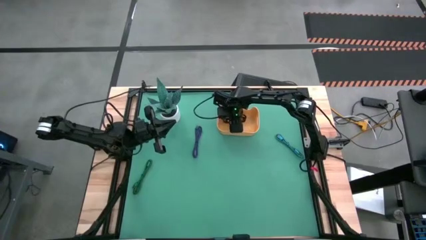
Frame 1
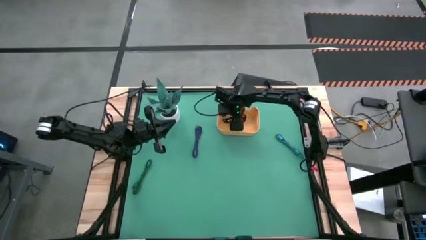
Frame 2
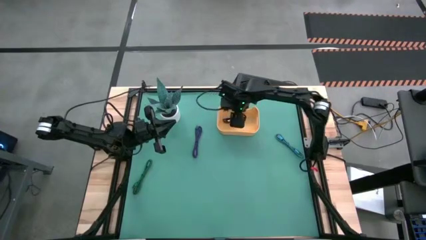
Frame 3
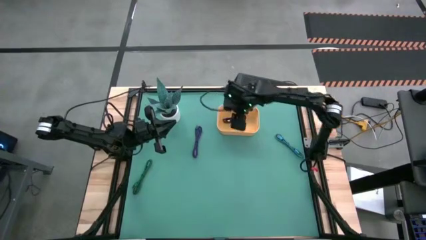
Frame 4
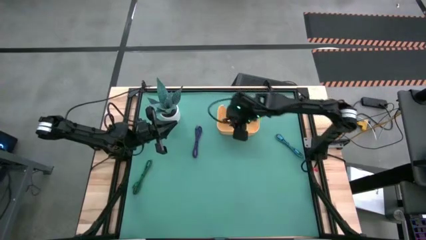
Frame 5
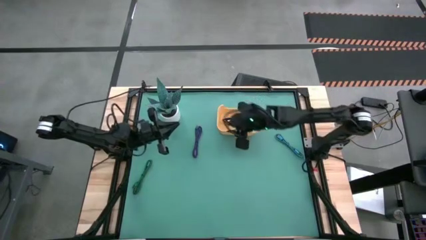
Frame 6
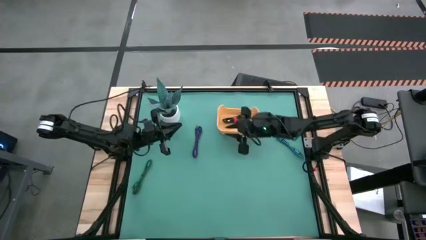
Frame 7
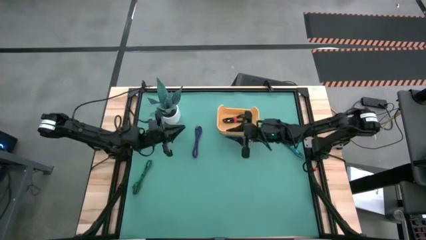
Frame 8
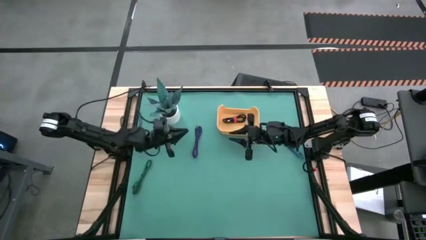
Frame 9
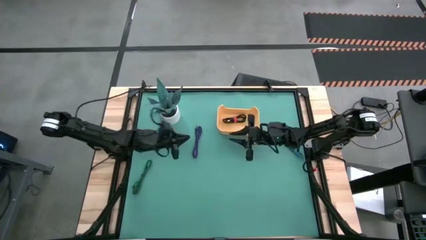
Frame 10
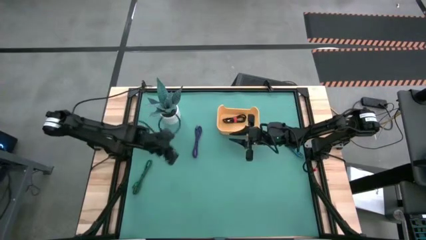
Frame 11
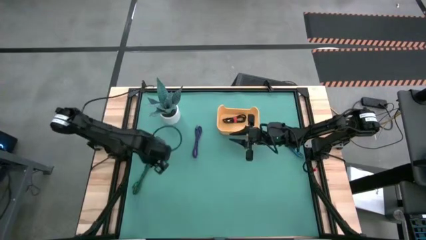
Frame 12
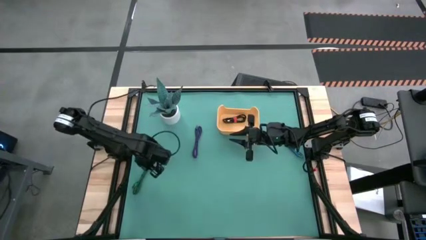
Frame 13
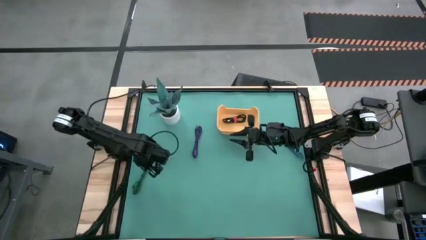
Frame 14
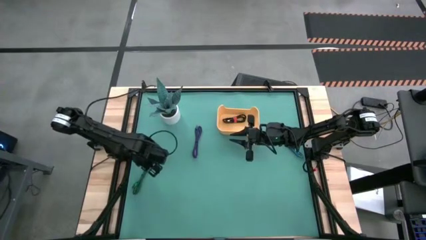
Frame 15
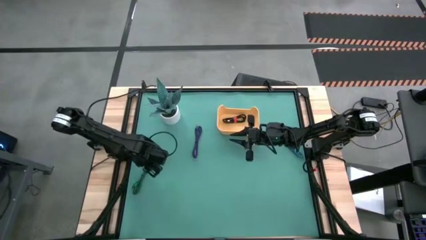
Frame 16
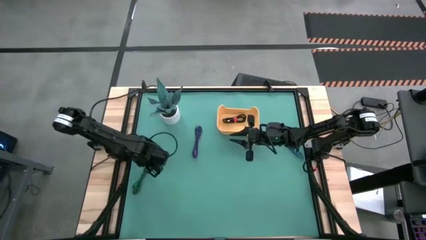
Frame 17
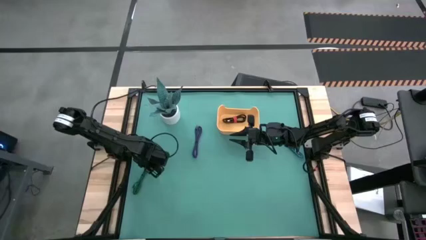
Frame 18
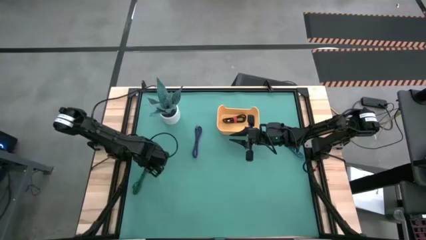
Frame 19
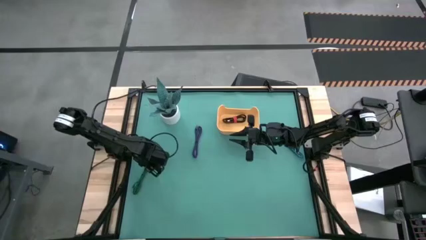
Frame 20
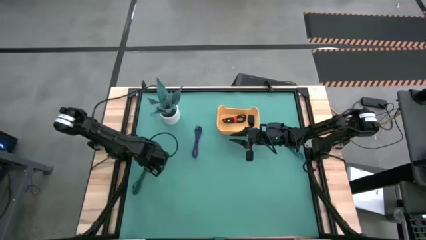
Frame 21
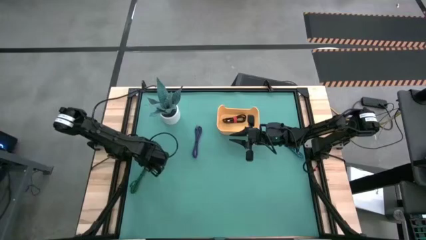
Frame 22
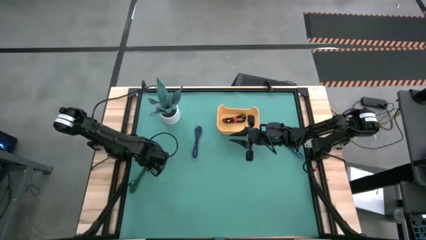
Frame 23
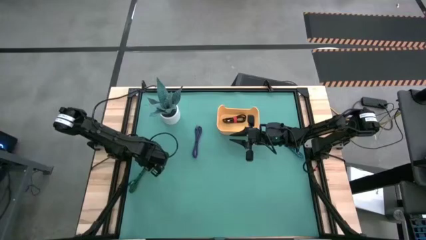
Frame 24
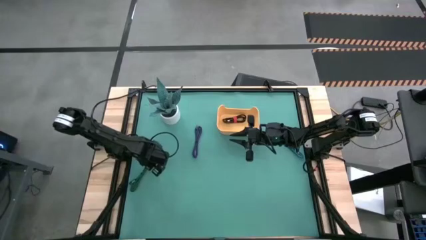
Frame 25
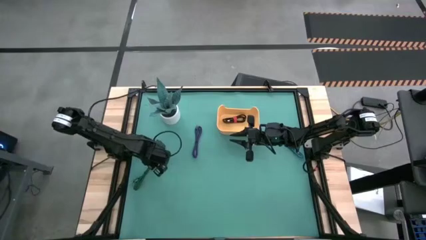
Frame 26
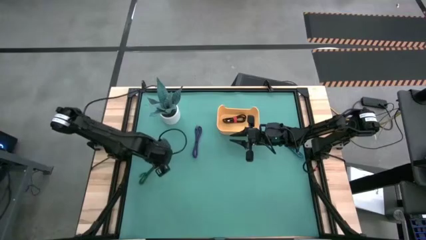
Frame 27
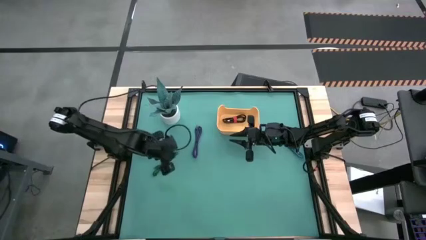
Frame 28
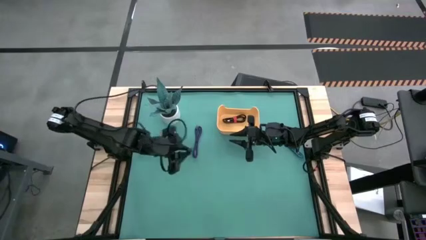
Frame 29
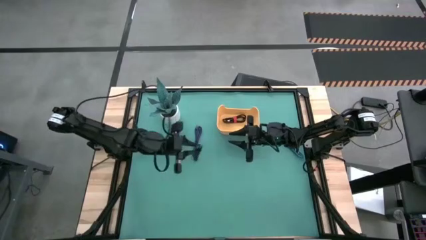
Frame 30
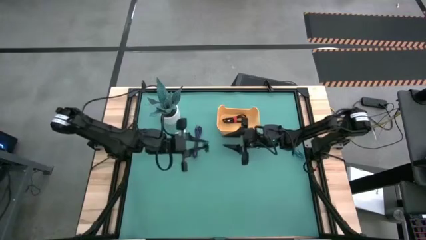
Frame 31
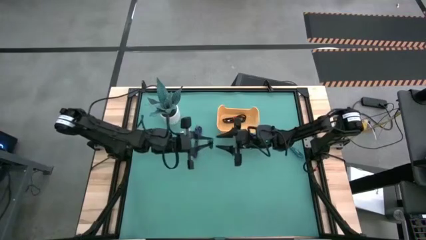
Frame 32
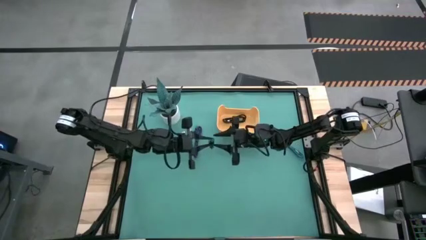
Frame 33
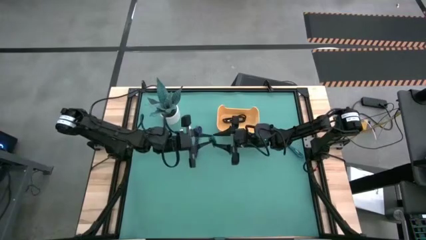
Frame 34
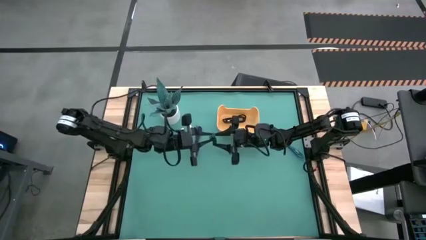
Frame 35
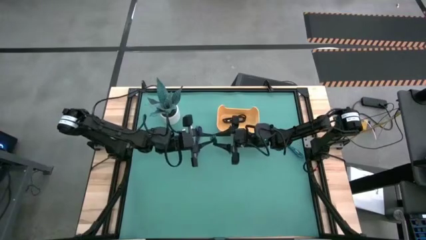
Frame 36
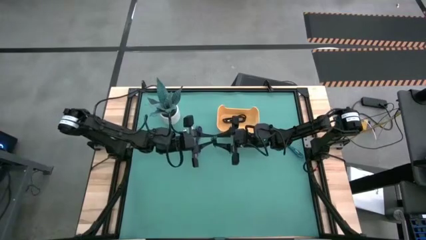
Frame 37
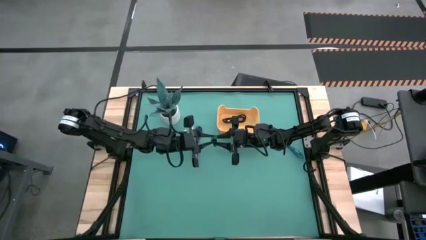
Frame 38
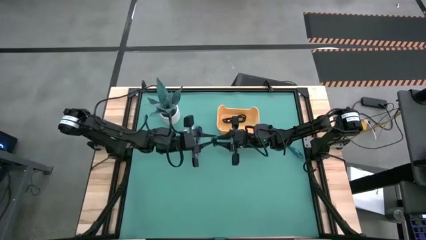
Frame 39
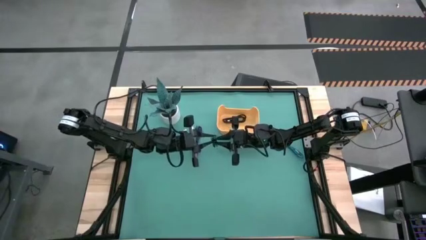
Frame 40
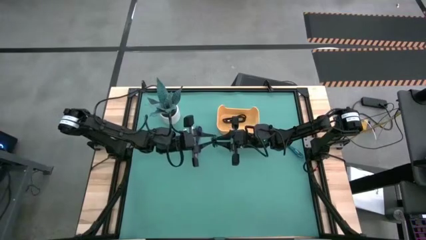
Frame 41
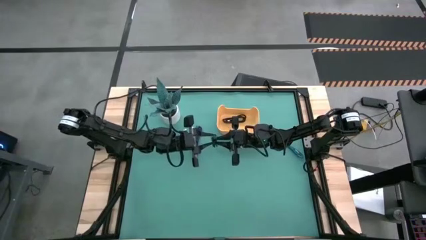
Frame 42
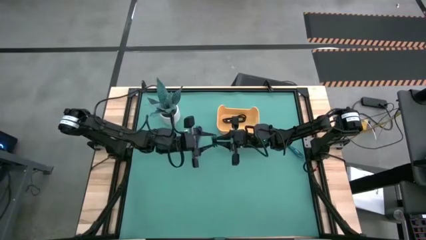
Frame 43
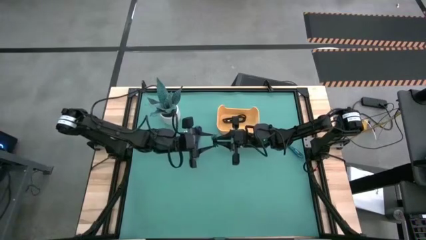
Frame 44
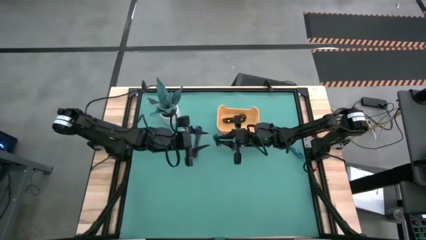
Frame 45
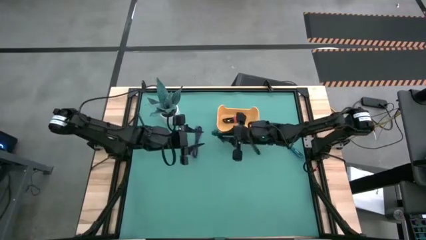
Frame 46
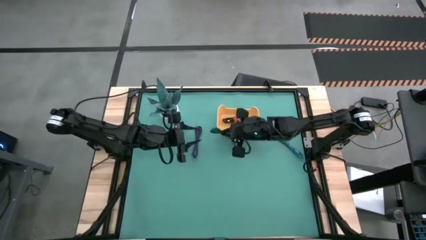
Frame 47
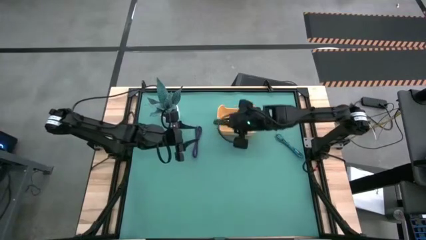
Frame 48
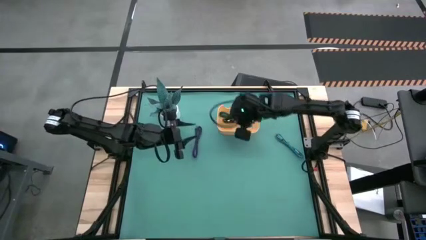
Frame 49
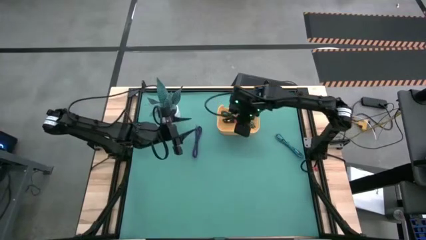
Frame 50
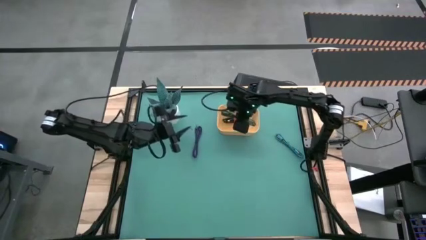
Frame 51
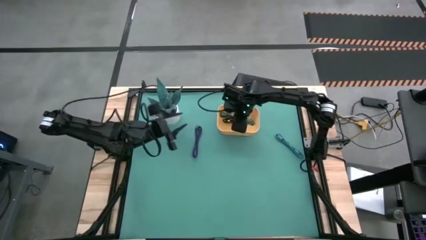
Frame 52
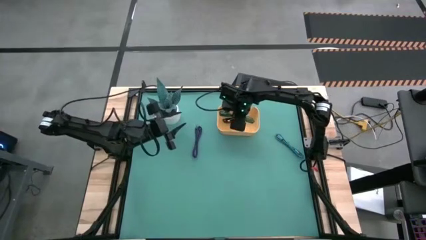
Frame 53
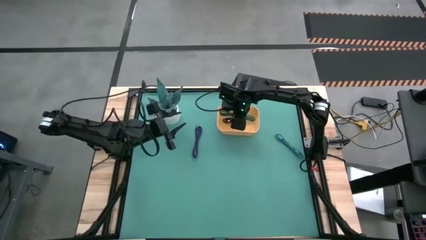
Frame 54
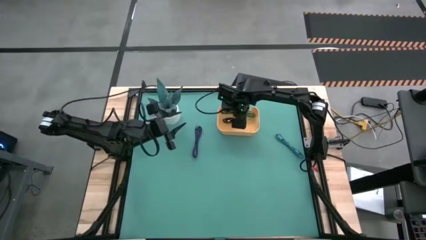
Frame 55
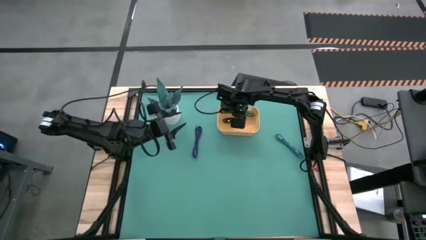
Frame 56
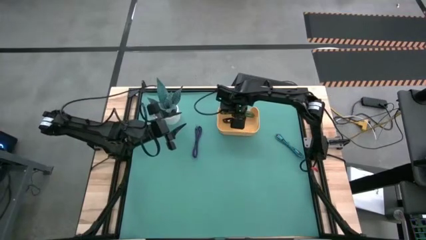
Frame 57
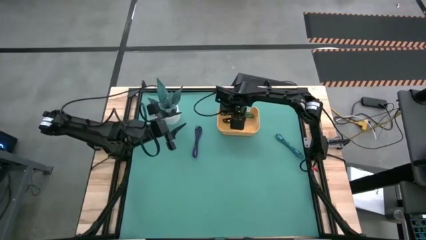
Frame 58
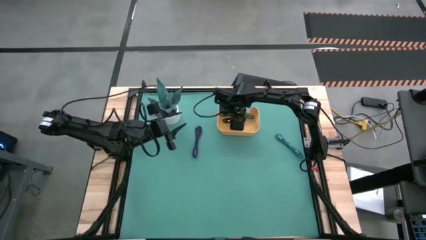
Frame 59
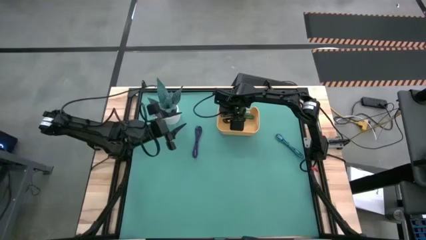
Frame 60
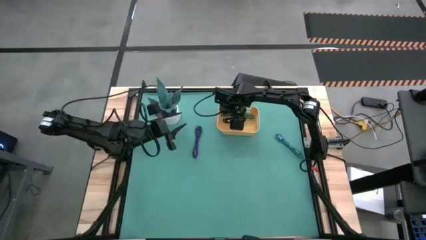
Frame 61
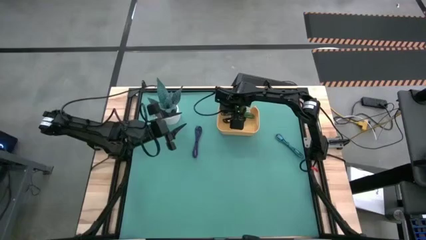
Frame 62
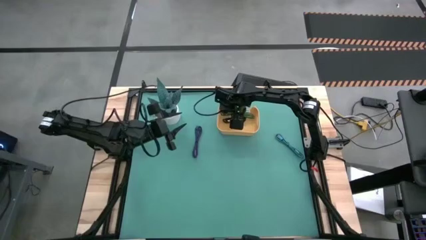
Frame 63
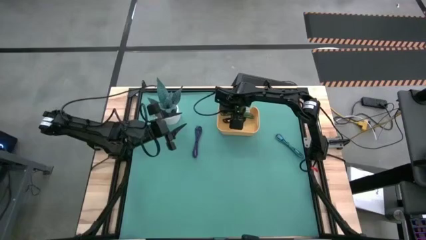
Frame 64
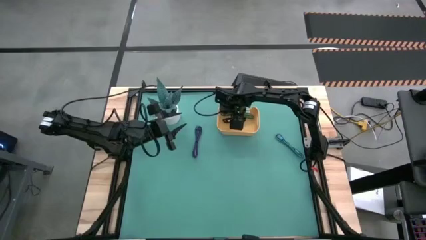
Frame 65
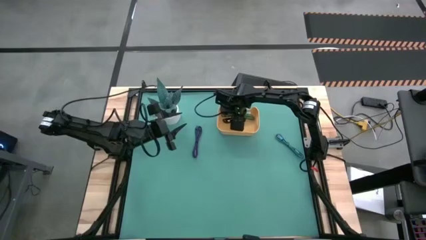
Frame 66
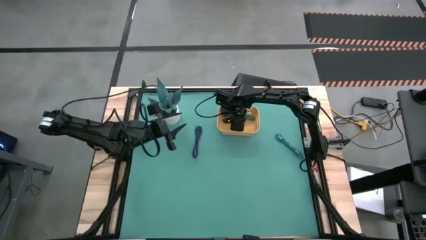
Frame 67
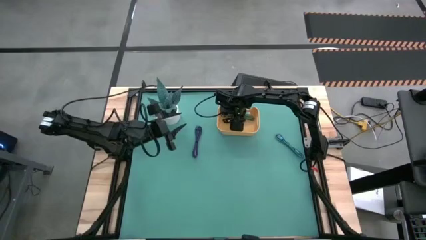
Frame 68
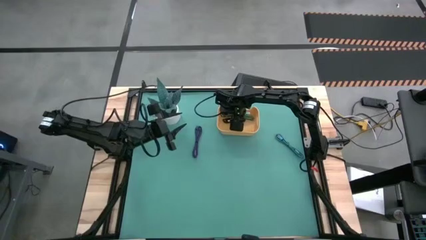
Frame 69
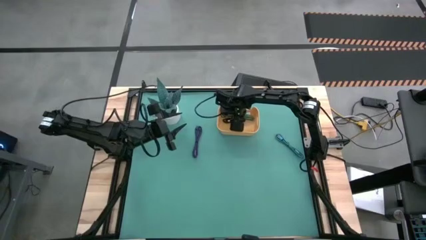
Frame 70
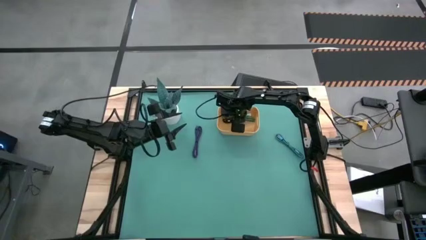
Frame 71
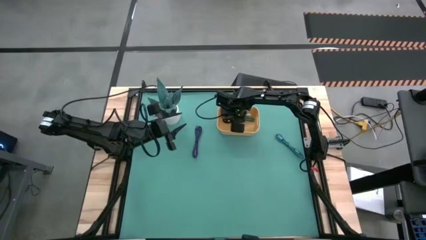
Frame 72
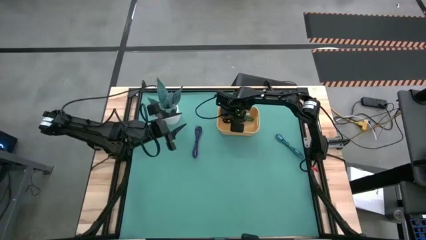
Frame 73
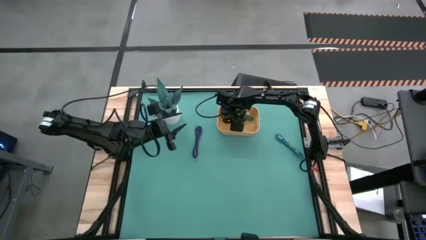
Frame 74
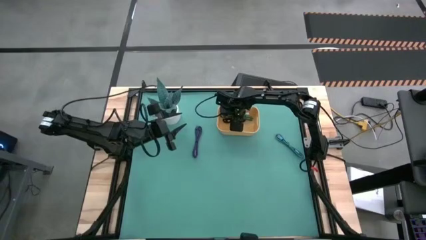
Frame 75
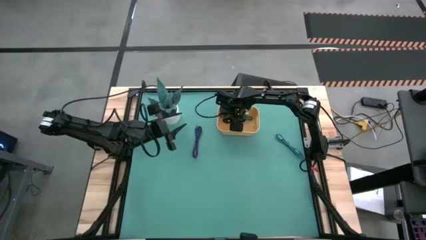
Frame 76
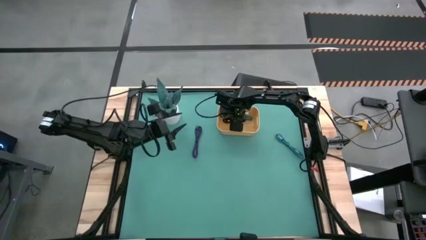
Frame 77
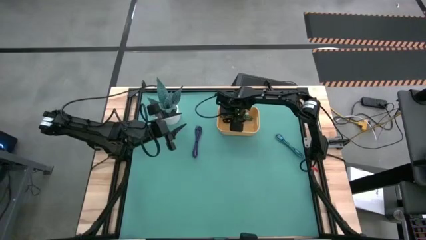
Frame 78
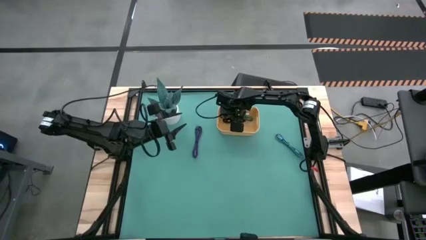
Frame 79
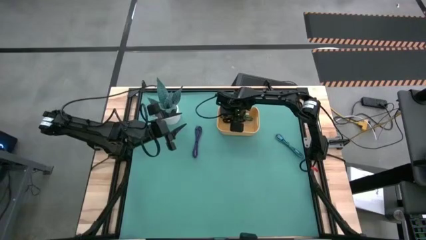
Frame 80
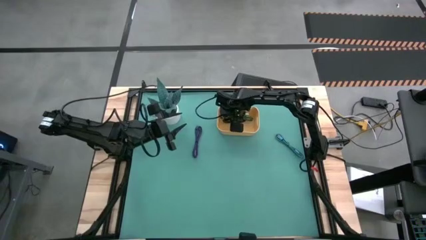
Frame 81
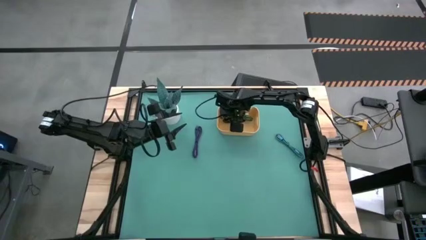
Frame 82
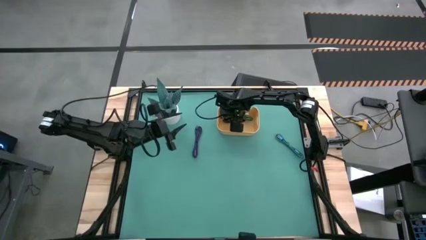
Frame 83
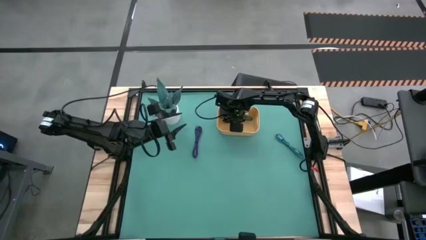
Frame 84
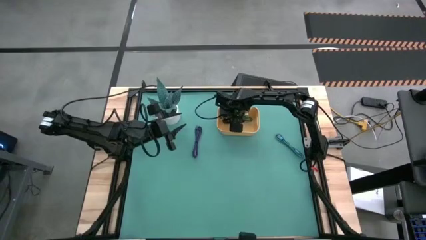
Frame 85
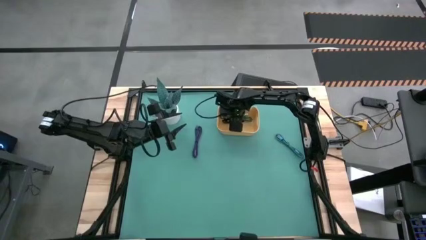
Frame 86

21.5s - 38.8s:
Task: Pick and place USB-C Cables
Put the green charger cable into the yellow bin
